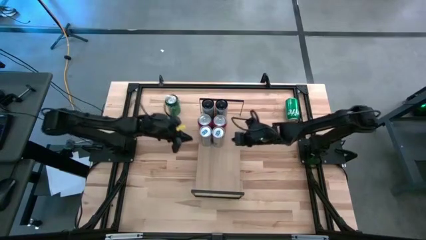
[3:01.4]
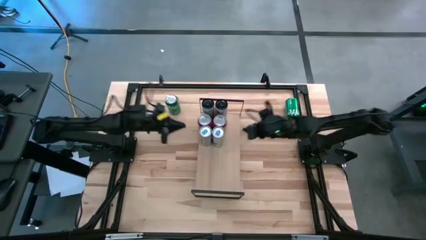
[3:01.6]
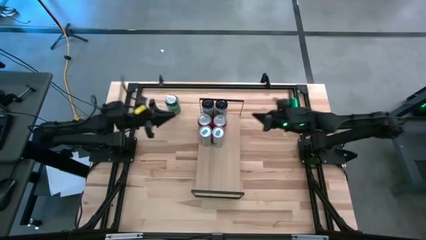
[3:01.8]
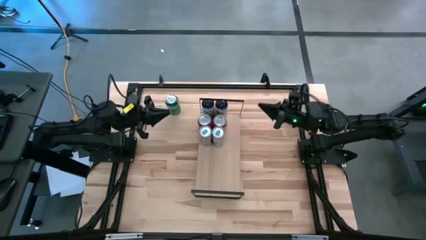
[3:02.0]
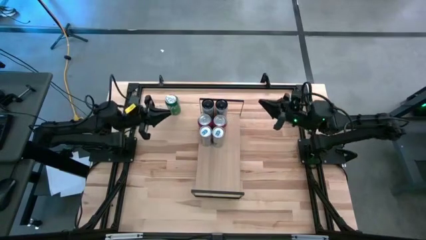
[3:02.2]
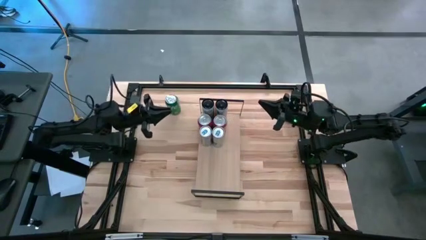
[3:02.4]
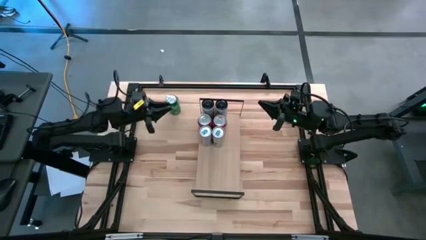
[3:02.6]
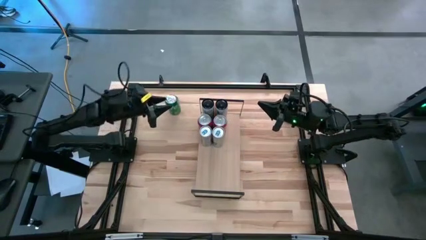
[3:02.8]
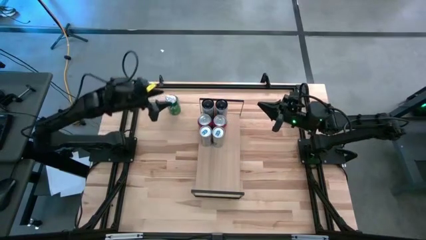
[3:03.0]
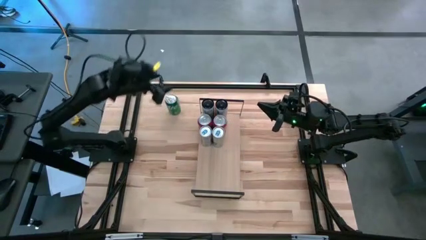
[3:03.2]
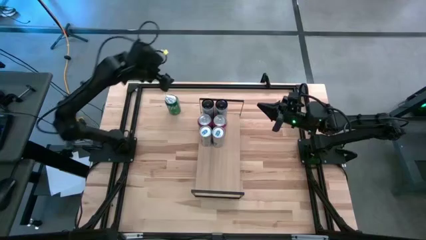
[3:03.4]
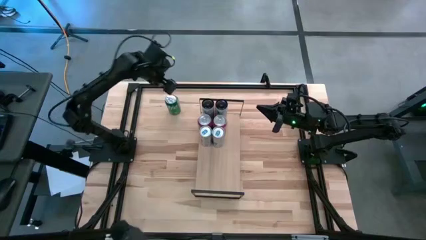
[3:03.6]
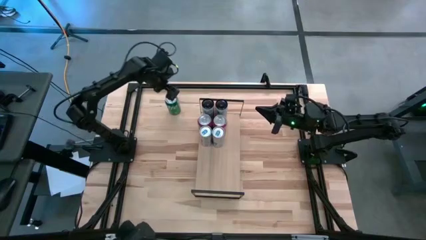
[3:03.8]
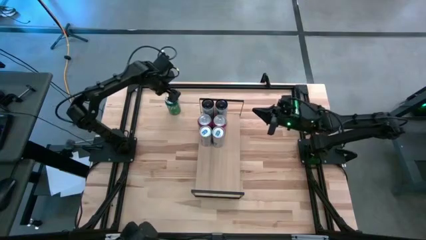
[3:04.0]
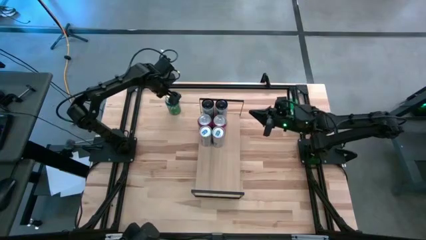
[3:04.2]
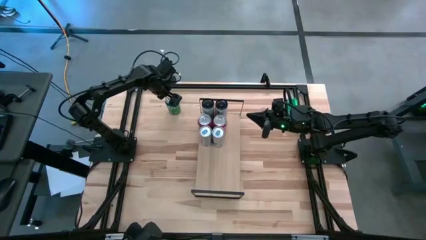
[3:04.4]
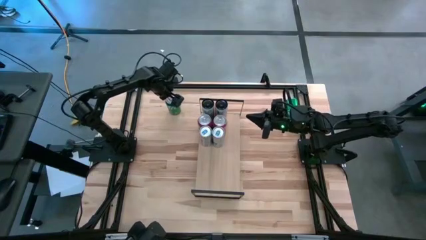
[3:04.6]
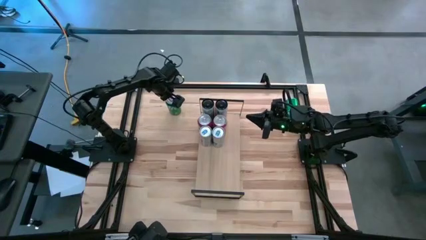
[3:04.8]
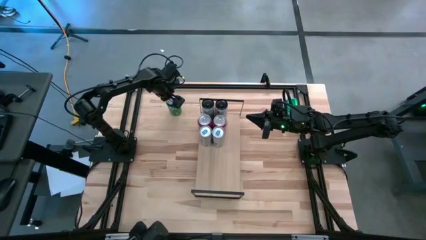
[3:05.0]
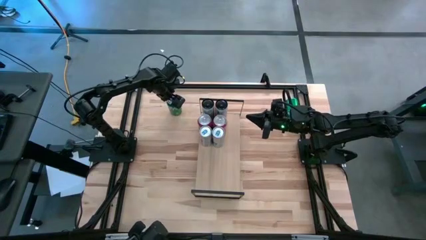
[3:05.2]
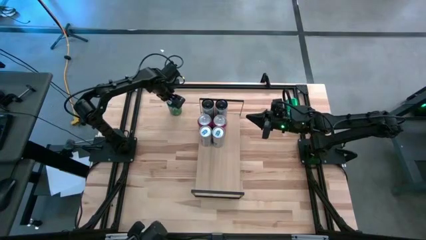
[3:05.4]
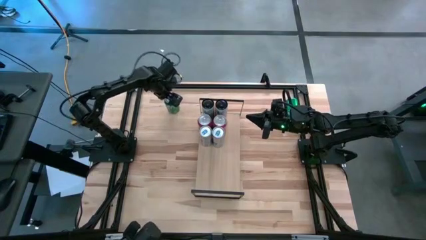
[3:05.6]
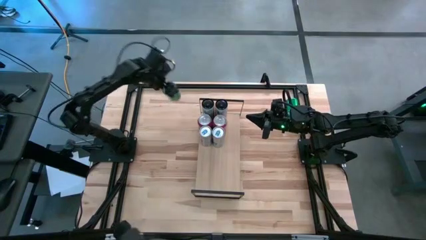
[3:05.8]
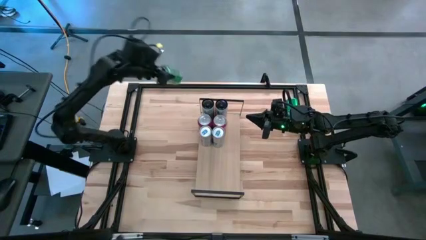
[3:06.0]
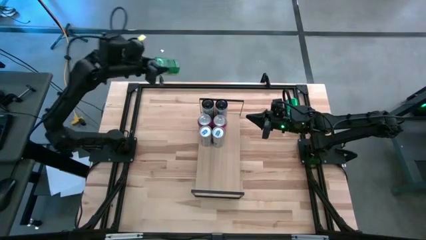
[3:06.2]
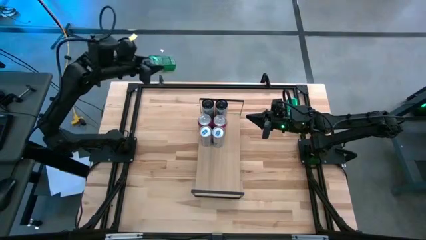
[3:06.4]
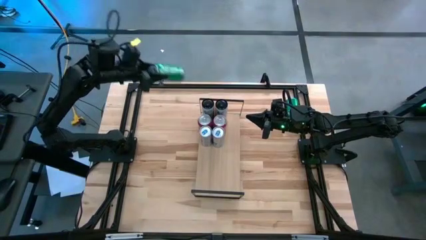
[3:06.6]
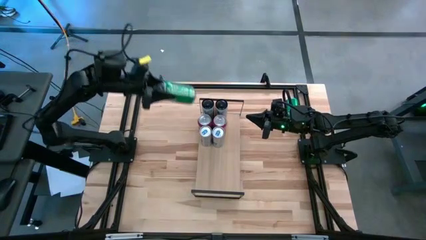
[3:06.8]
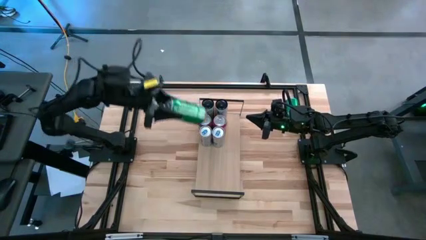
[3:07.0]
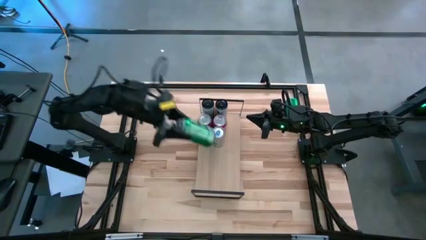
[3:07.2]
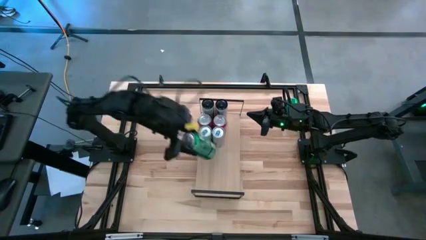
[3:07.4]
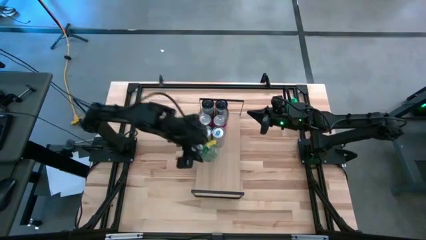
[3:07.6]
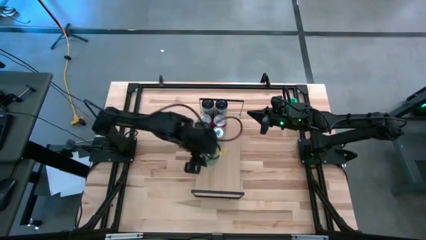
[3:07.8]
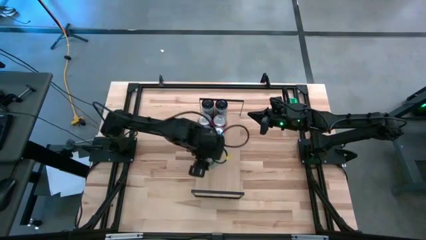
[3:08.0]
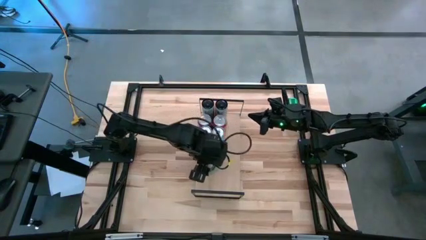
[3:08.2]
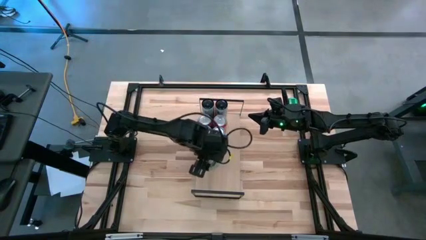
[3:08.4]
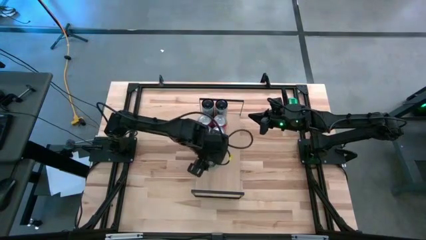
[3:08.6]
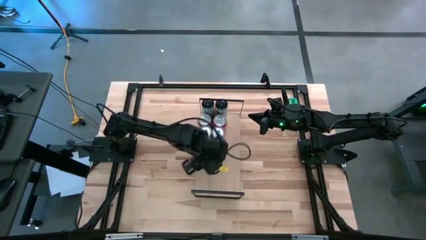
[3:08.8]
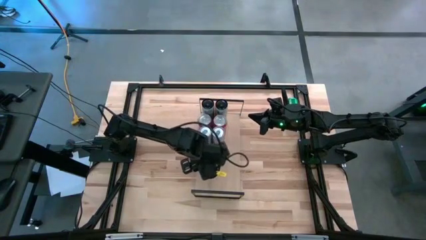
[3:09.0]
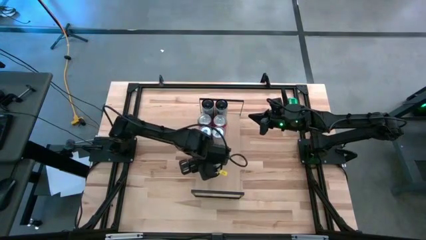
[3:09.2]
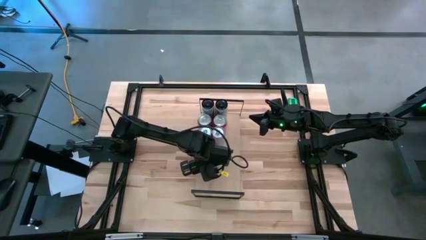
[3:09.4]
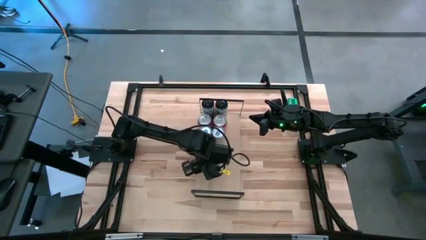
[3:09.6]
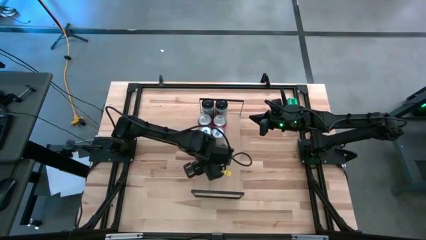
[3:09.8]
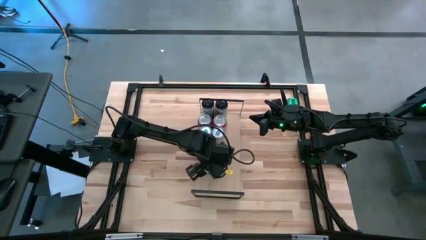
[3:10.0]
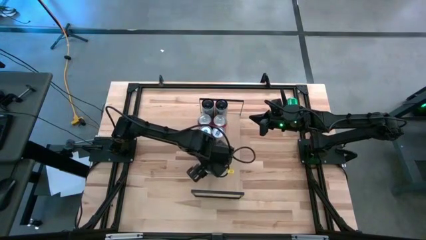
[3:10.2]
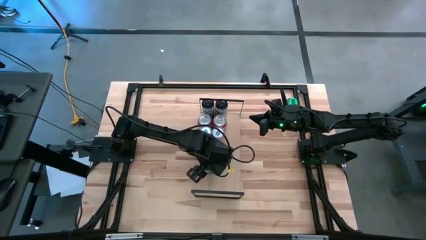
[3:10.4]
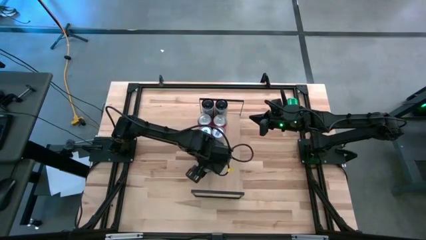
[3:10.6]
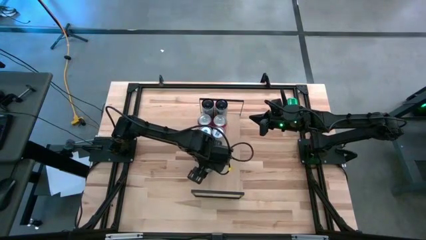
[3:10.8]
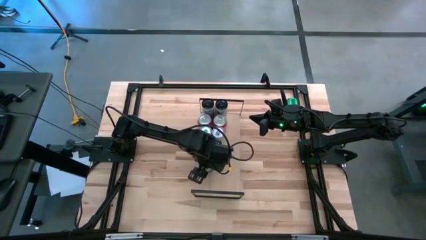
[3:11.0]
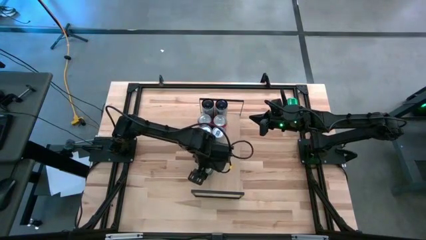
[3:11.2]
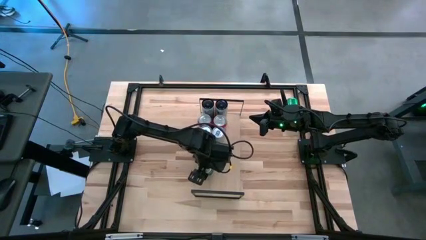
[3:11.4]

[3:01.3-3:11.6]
Task: Place canned beverage on shelf
Put the left green soda can on the shelf
